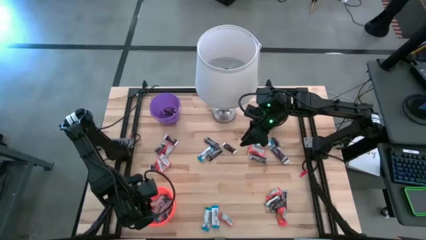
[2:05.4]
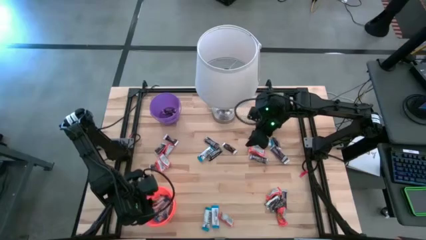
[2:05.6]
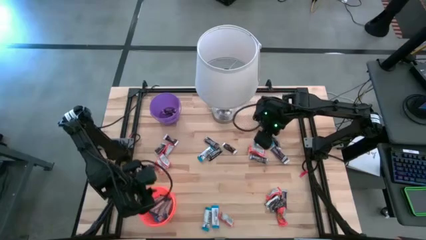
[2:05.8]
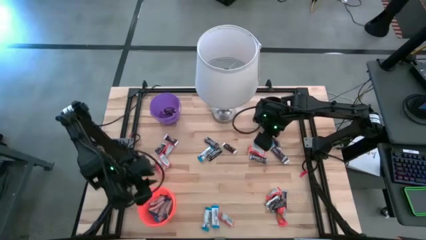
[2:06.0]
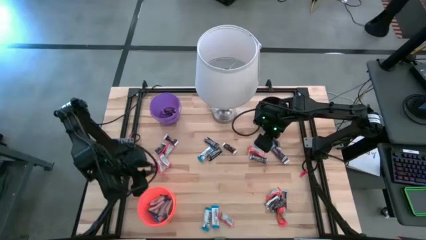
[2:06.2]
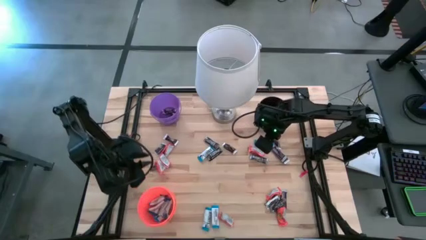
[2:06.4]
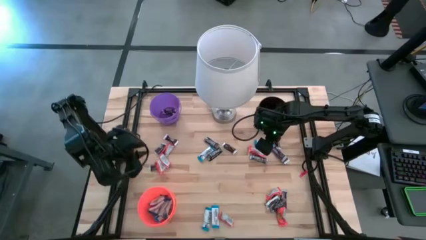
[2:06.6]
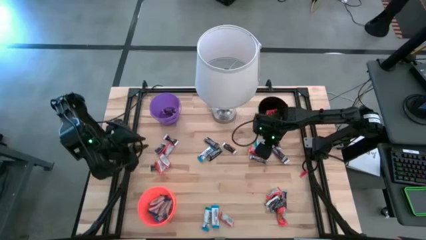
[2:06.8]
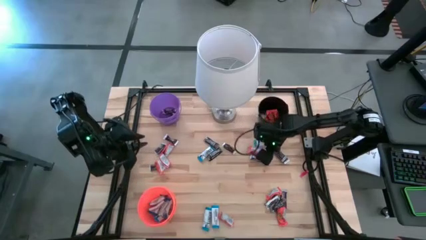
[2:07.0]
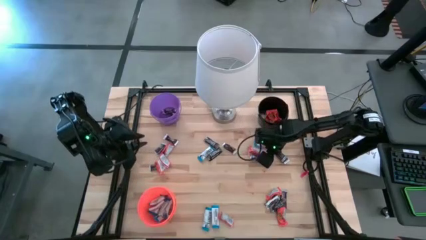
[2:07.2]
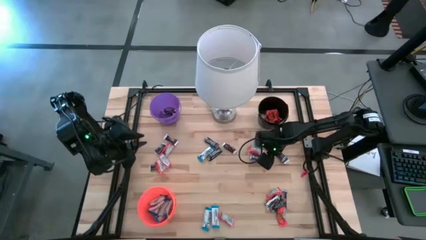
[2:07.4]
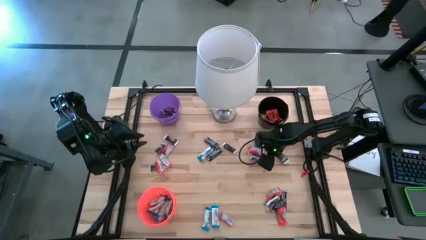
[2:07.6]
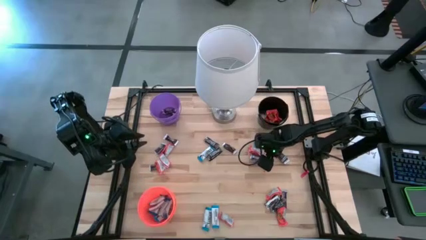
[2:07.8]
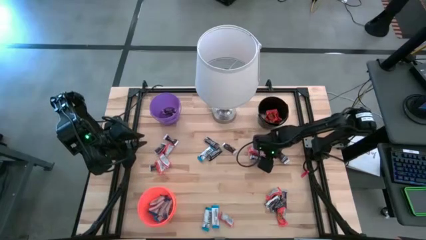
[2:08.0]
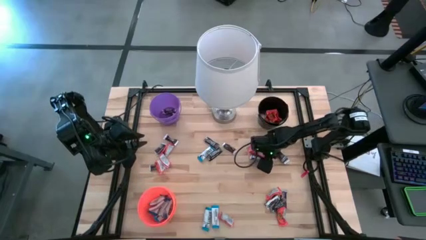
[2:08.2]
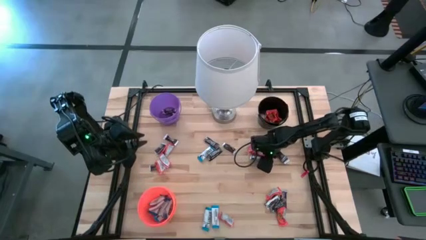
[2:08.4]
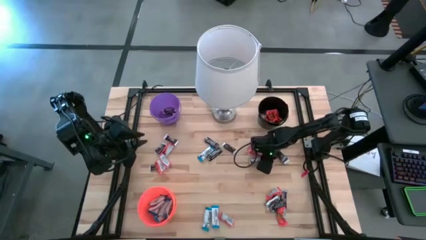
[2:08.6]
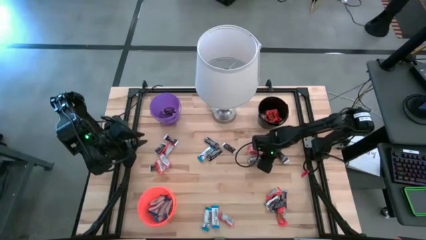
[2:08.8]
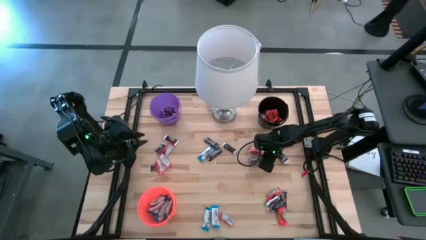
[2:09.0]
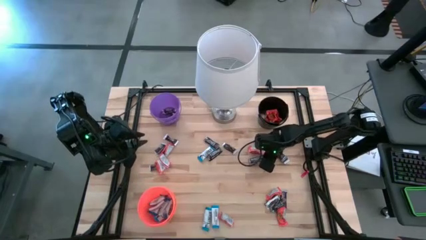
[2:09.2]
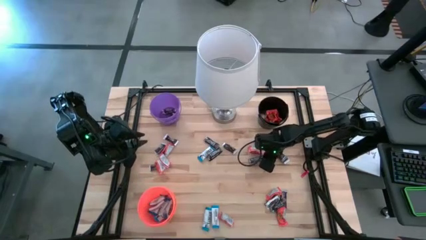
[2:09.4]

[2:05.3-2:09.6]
Task: Organize candy in baskets
Put the brown chocolate bar into the purple bucket

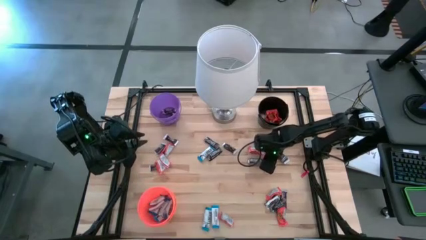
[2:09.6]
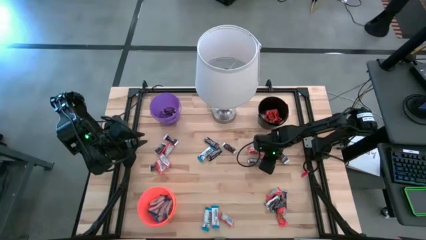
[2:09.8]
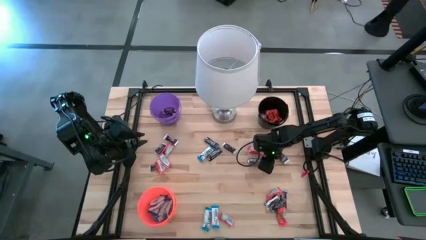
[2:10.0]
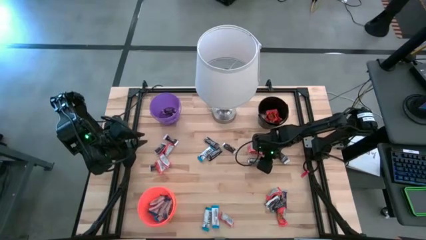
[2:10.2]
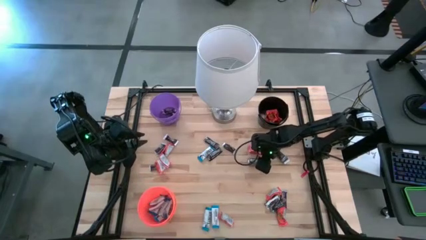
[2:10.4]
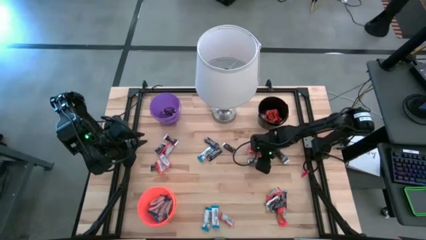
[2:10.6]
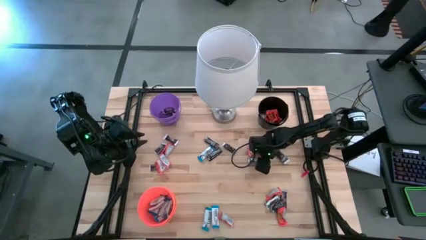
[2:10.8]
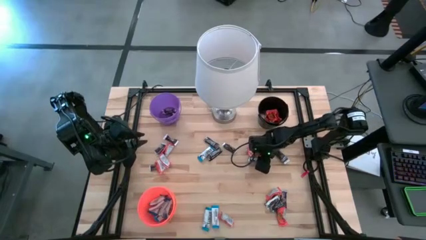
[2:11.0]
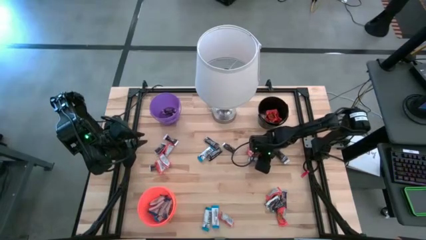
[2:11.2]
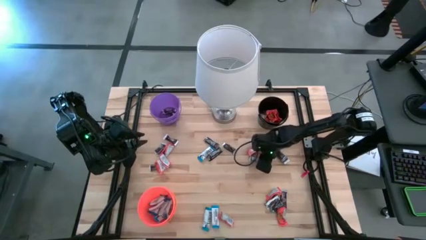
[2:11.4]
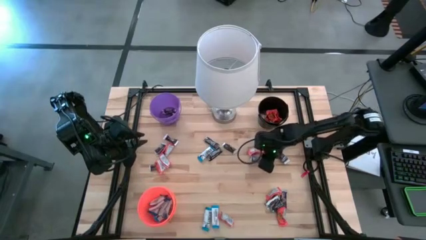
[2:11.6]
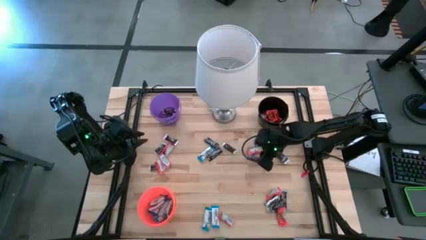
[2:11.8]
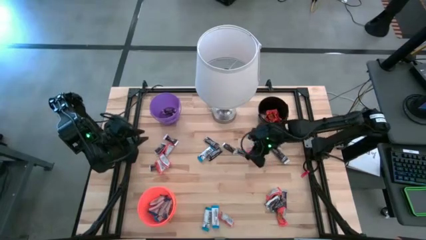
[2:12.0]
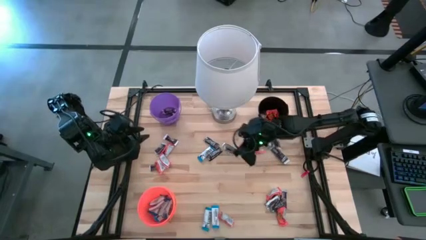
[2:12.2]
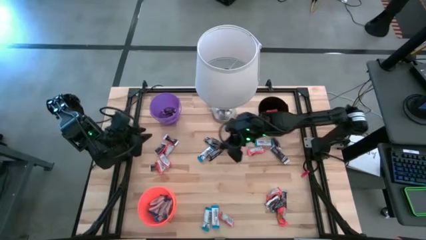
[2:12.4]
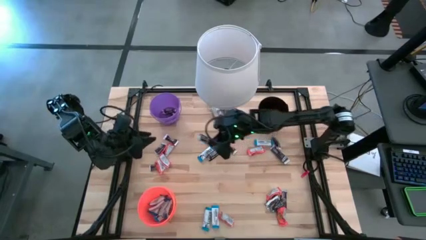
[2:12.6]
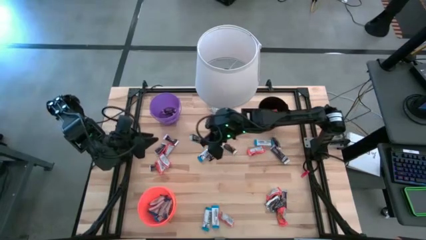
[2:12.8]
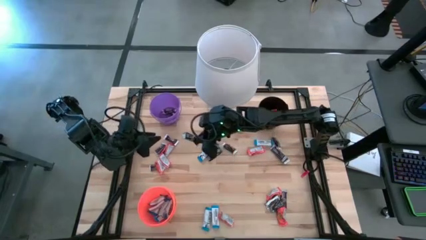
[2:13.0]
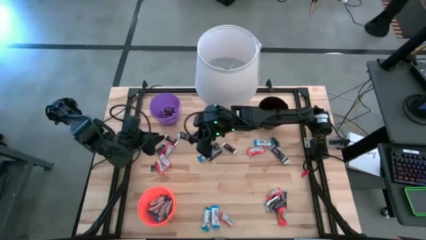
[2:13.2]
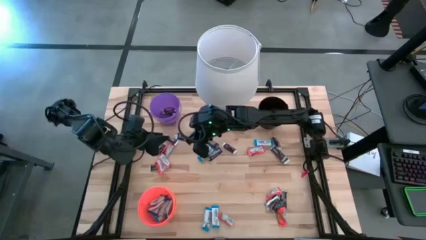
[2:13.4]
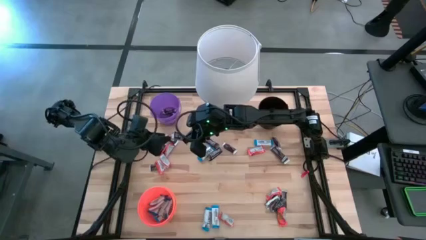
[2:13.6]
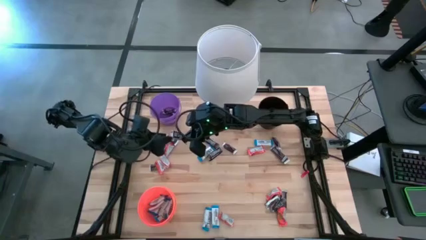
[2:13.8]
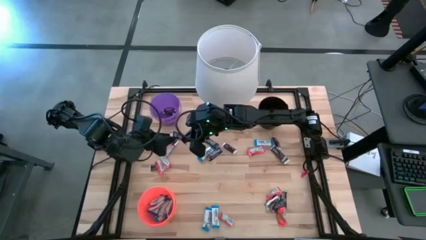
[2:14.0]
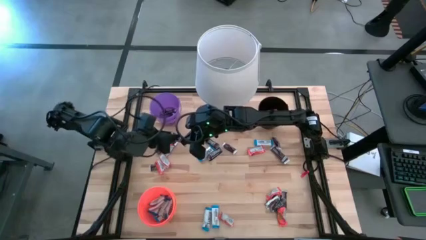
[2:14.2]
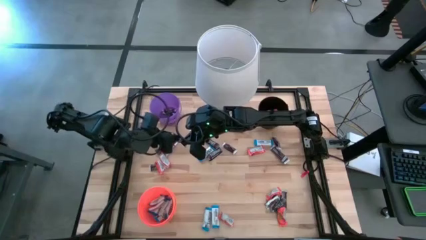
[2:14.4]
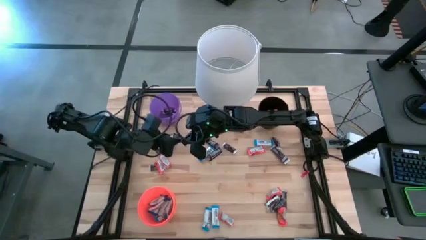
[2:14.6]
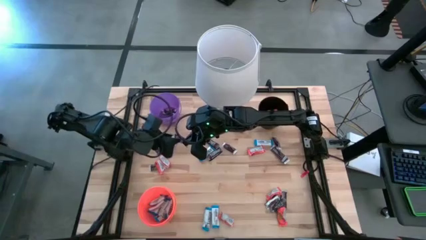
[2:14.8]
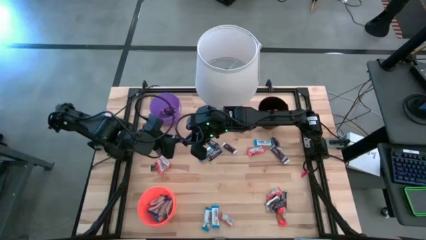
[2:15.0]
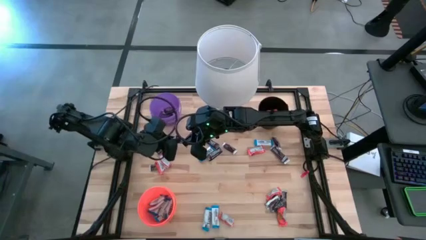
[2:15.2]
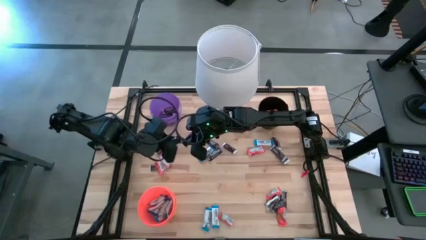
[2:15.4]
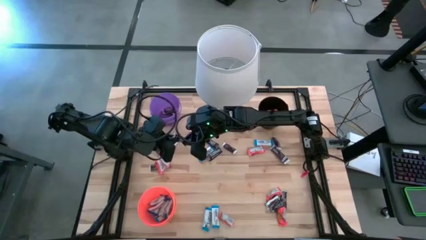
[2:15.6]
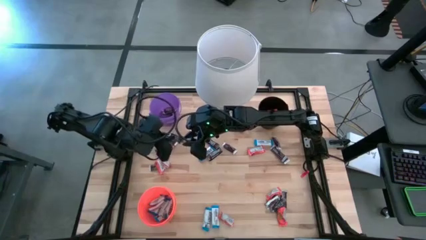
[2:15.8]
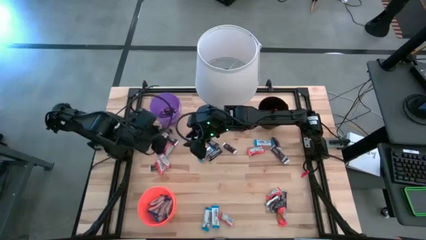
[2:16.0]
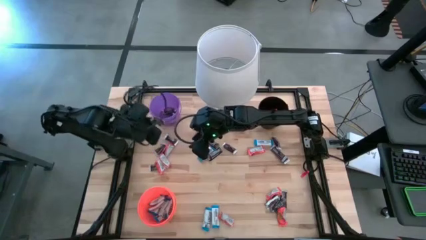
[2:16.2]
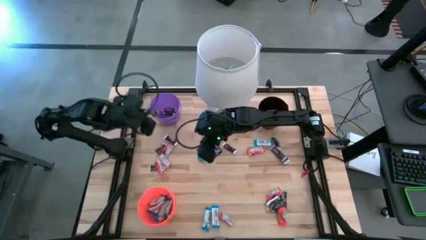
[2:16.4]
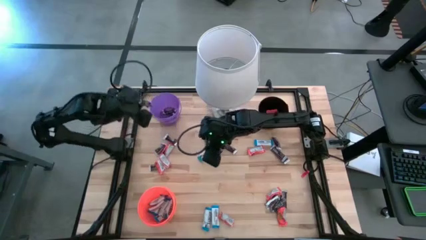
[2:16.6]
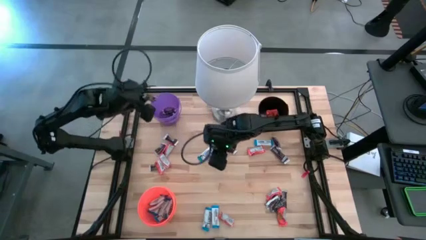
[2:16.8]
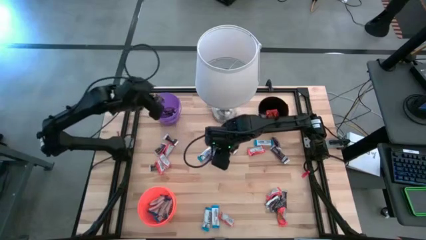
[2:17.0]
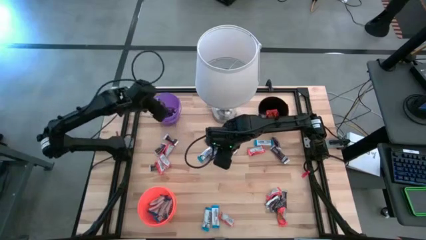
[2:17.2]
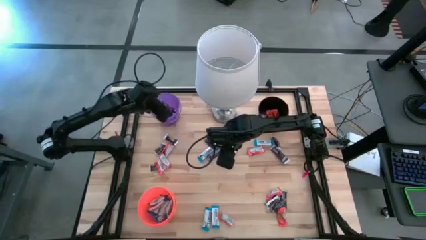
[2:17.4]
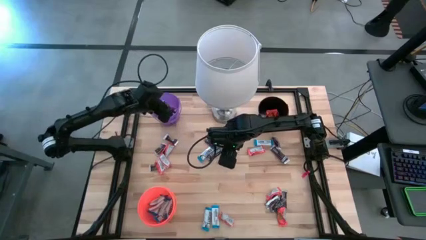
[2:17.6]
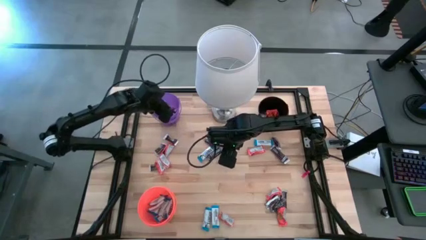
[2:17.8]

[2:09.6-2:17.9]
Put the brown chocolate bar into the purple bucket

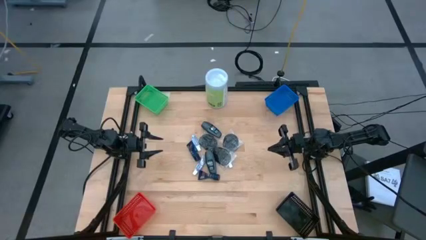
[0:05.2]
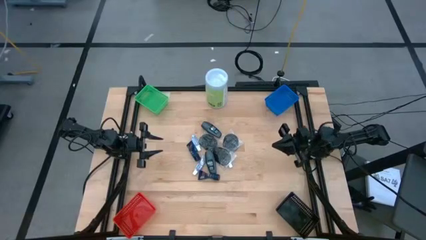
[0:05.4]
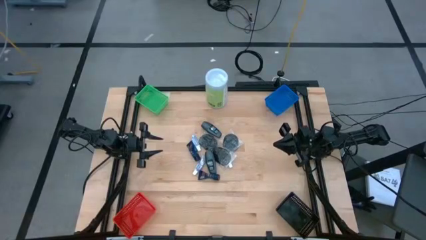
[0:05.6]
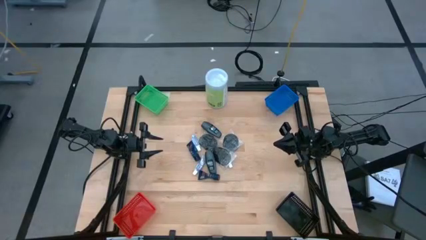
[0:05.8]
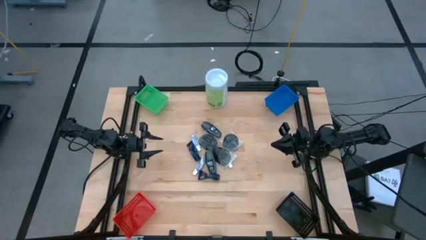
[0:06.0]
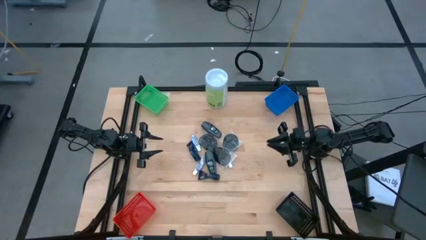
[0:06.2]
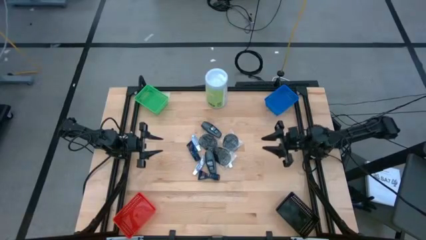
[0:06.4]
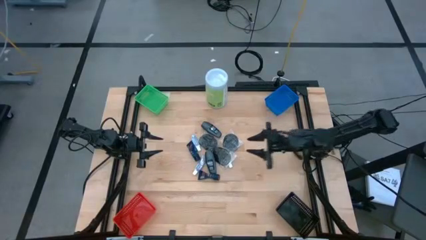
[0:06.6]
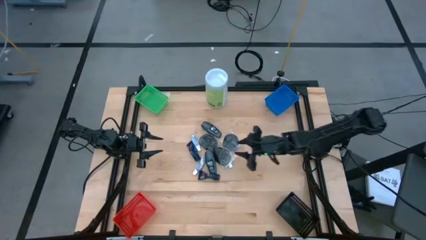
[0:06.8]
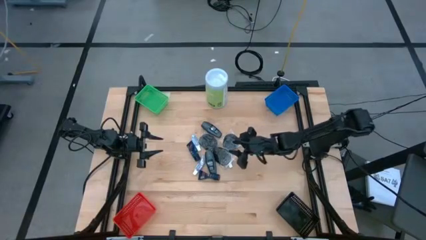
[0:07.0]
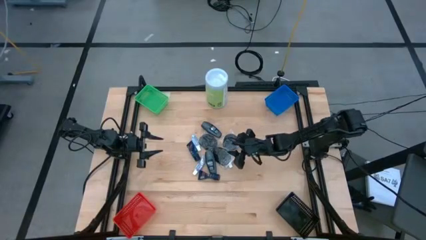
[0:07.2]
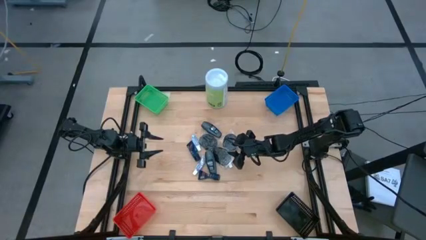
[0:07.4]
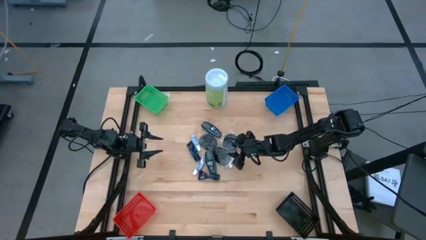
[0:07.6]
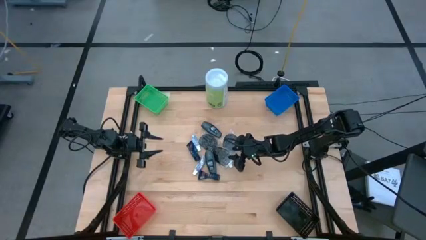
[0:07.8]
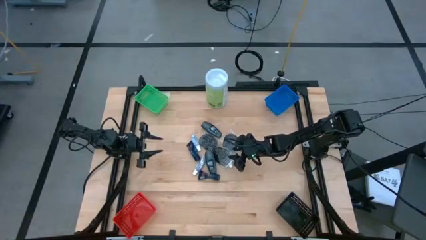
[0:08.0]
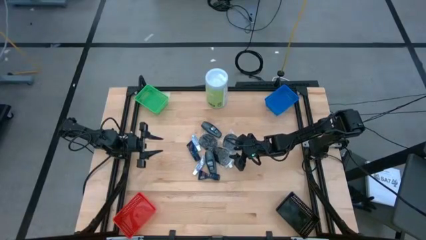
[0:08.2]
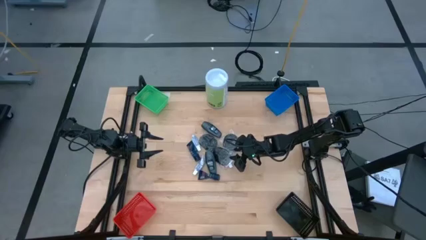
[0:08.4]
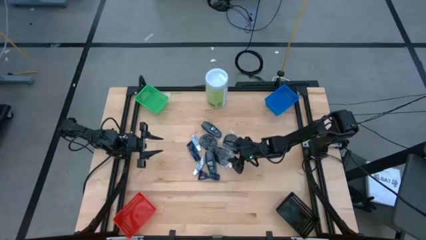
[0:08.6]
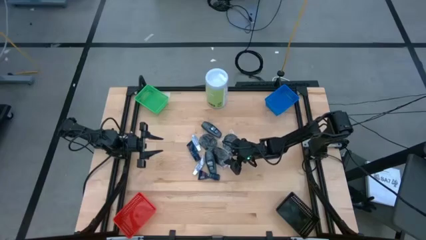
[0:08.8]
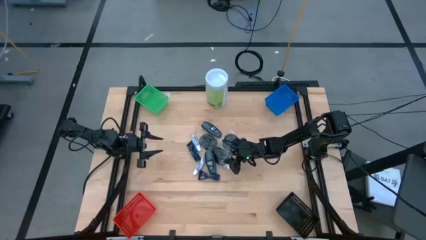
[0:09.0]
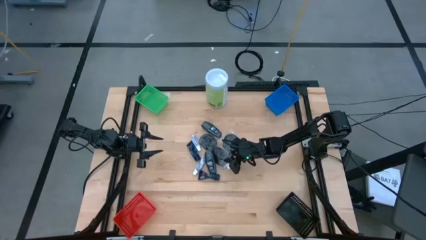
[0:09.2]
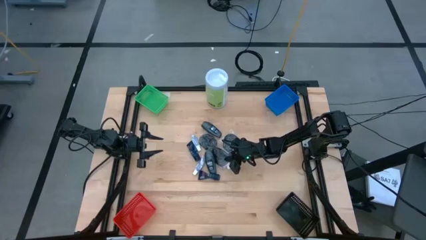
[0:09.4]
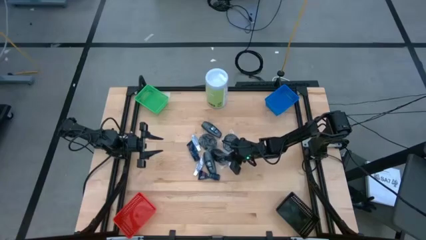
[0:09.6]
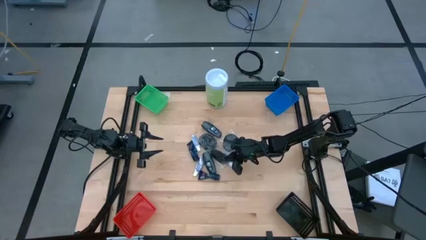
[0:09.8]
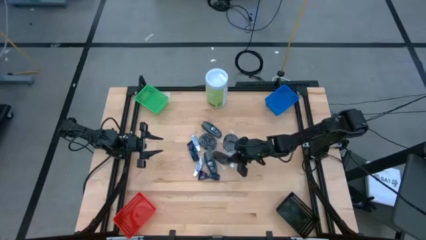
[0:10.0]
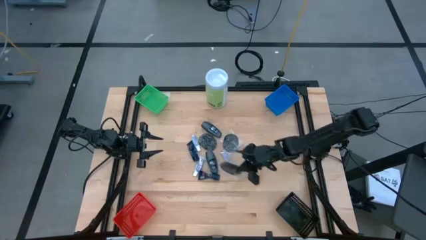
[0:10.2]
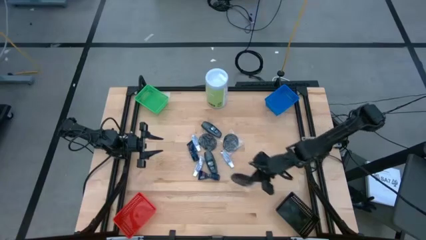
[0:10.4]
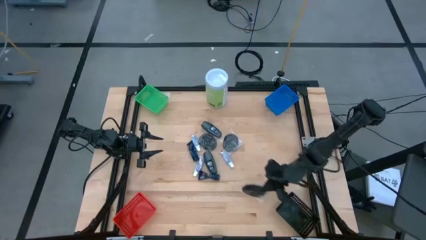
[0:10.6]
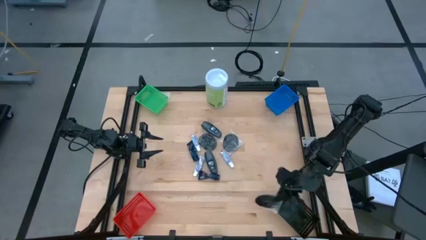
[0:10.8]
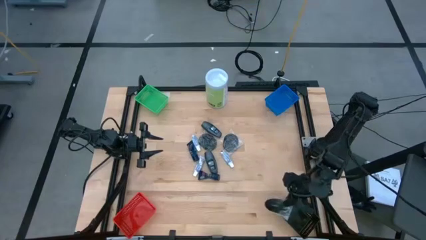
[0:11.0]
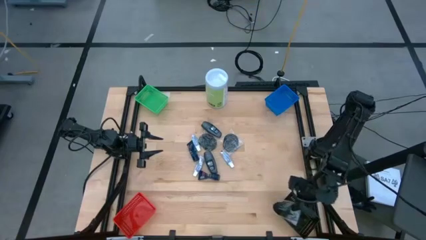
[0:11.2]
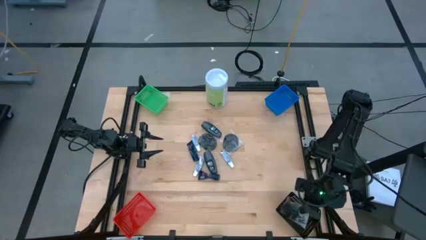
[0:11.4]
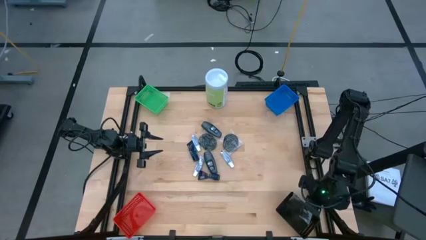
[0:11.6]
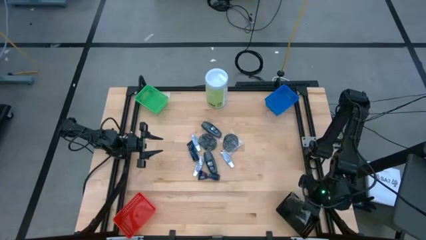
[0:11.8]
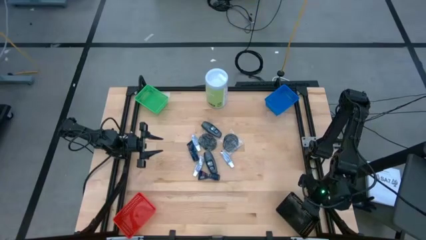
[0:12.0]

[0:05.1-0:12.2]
Task: Pick & Place Travel size toiletries
Put the bottom black hairbrush into the black bin
